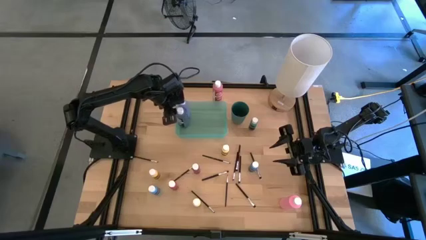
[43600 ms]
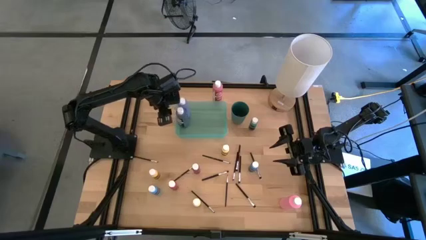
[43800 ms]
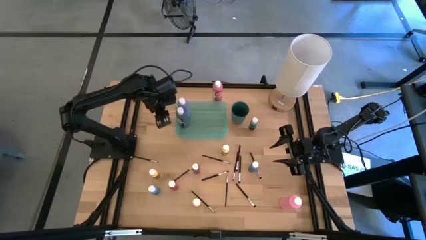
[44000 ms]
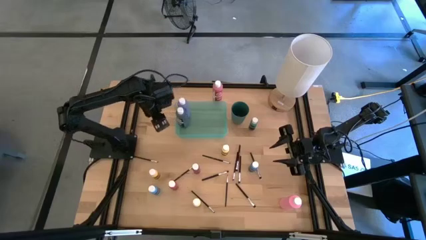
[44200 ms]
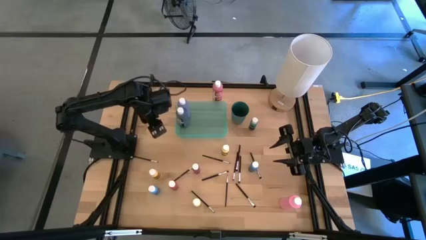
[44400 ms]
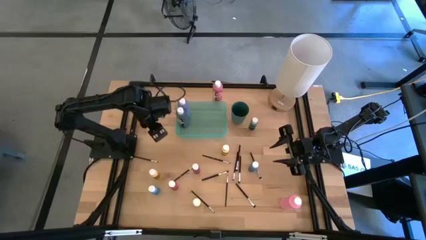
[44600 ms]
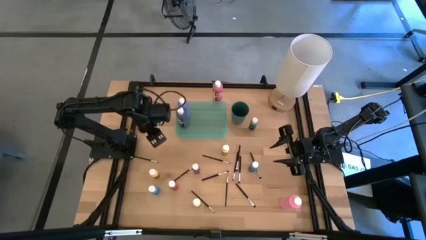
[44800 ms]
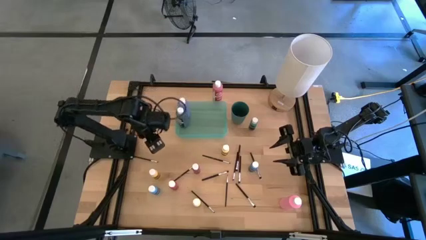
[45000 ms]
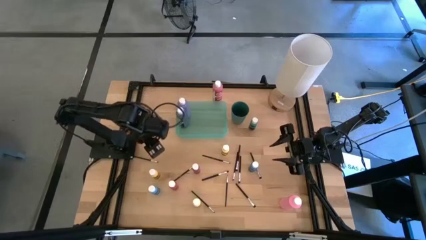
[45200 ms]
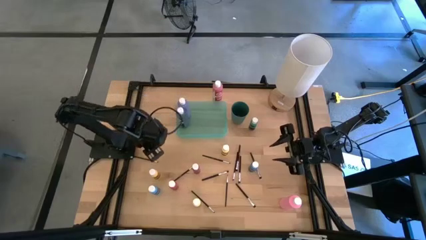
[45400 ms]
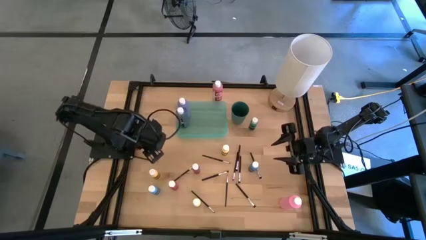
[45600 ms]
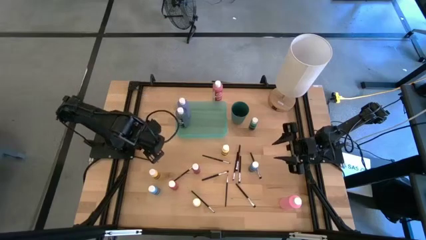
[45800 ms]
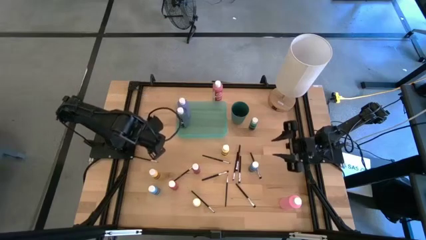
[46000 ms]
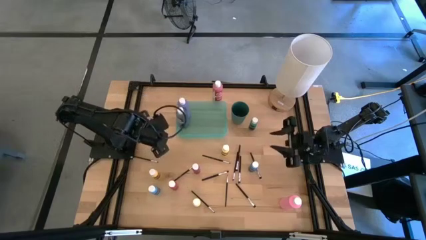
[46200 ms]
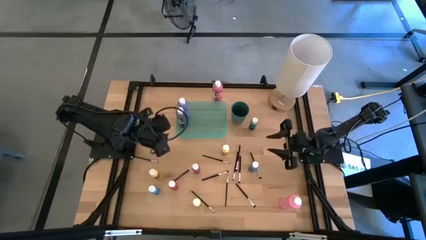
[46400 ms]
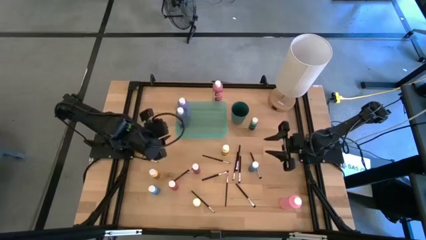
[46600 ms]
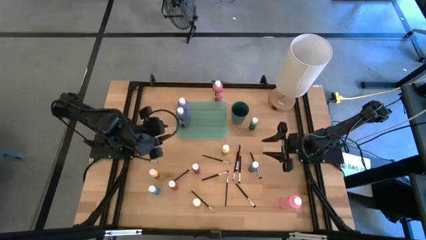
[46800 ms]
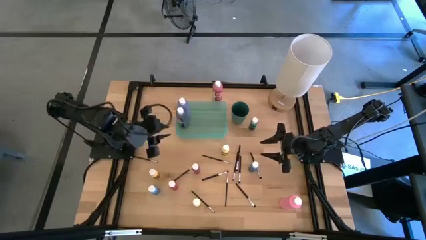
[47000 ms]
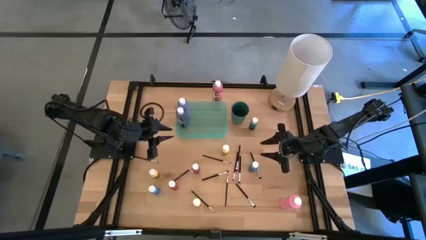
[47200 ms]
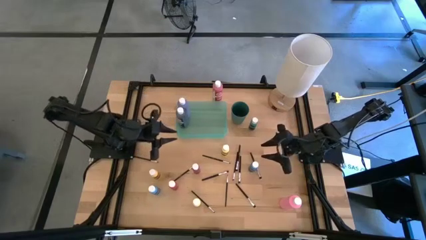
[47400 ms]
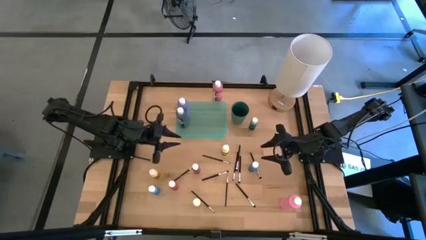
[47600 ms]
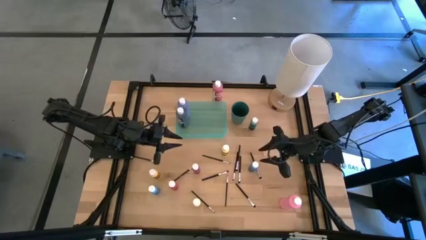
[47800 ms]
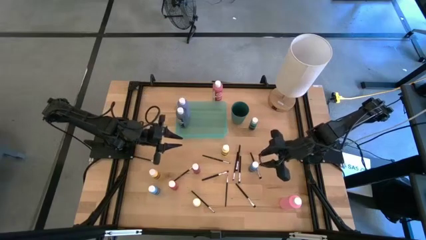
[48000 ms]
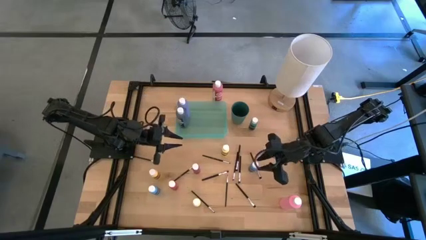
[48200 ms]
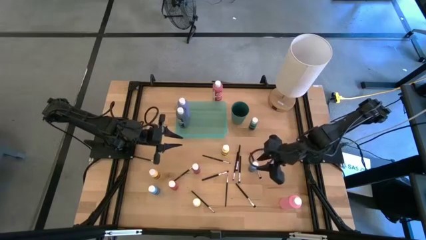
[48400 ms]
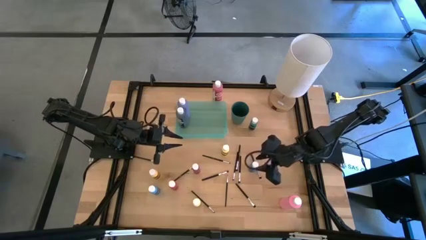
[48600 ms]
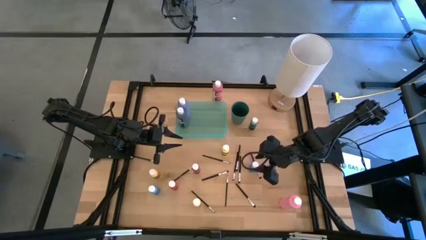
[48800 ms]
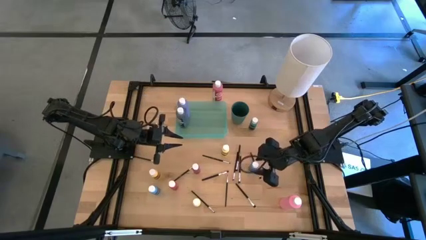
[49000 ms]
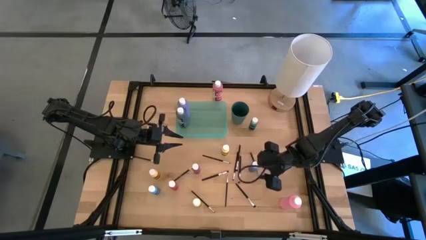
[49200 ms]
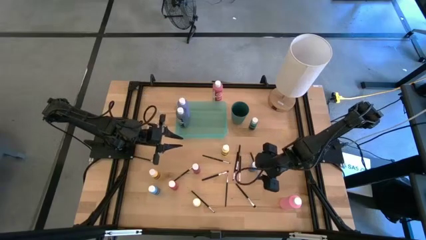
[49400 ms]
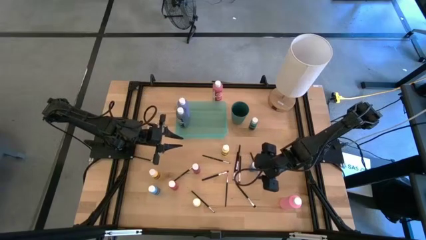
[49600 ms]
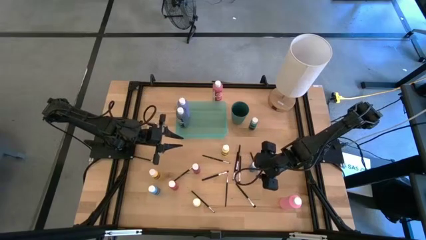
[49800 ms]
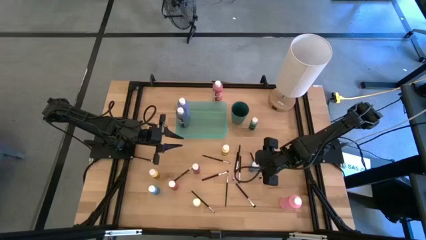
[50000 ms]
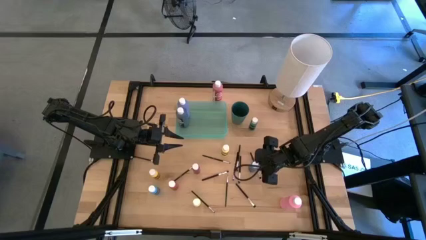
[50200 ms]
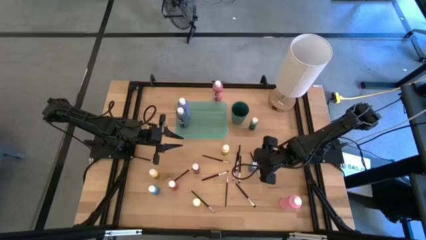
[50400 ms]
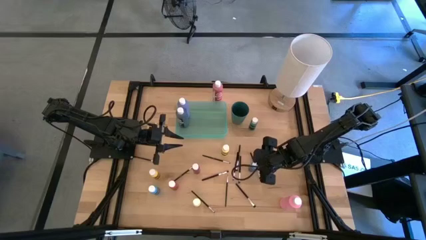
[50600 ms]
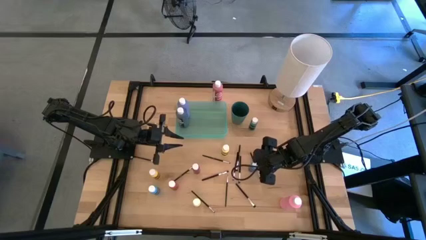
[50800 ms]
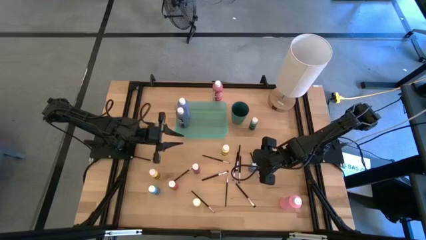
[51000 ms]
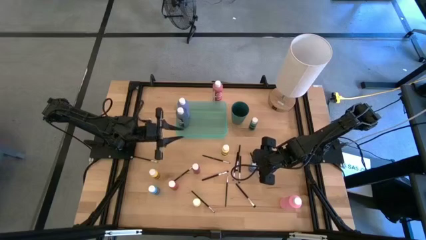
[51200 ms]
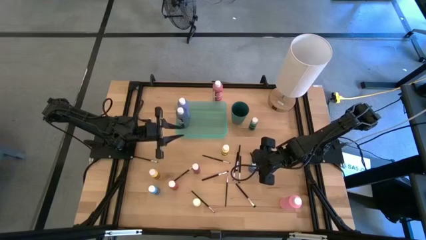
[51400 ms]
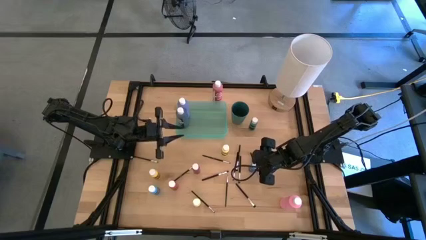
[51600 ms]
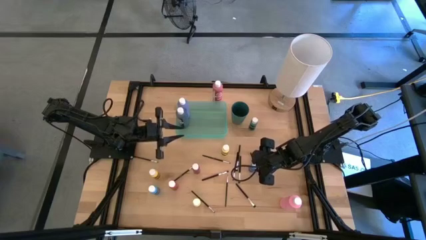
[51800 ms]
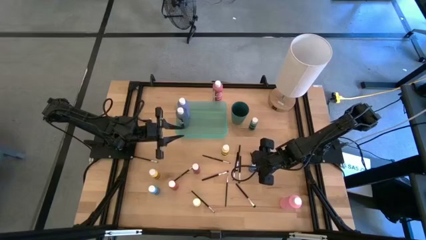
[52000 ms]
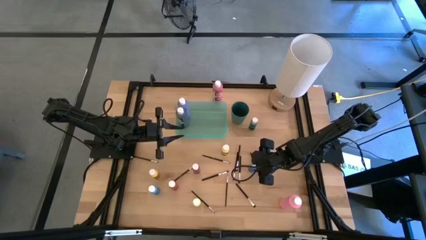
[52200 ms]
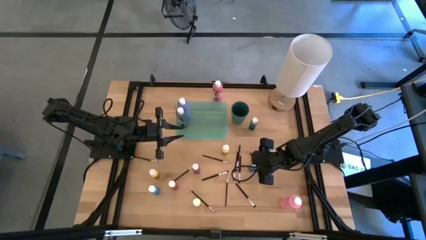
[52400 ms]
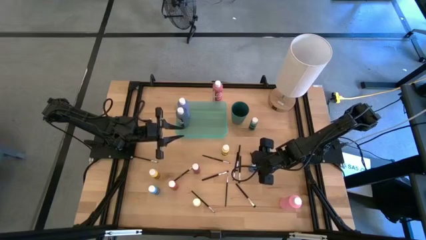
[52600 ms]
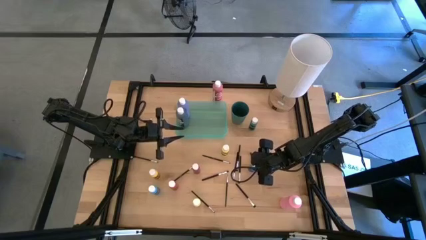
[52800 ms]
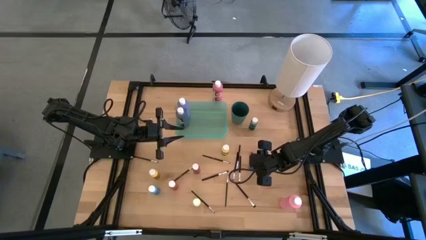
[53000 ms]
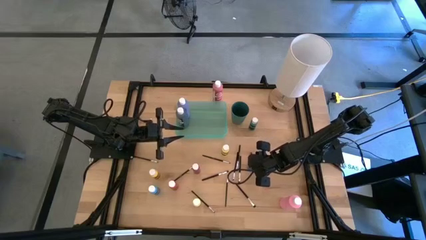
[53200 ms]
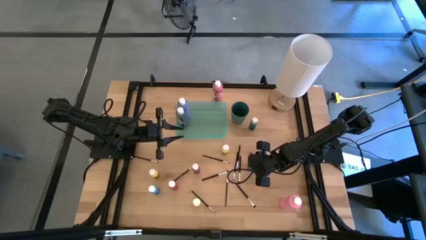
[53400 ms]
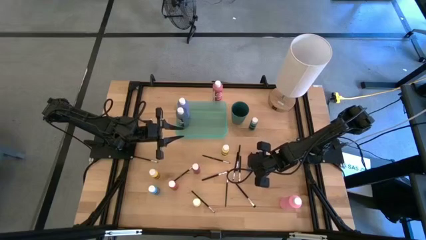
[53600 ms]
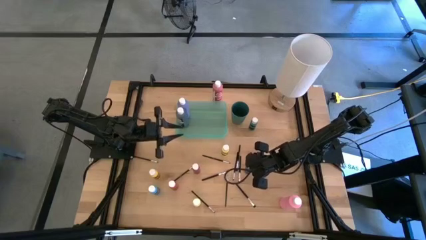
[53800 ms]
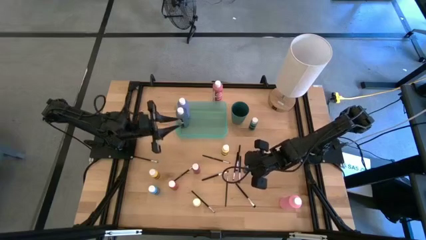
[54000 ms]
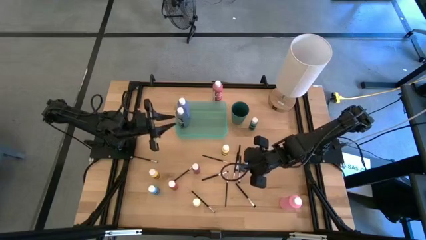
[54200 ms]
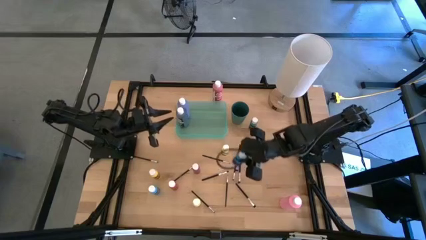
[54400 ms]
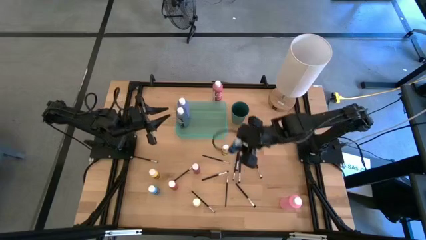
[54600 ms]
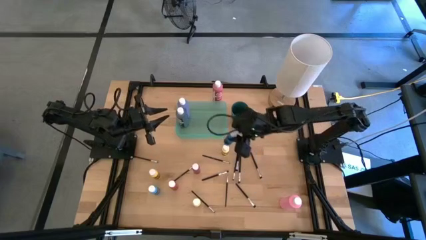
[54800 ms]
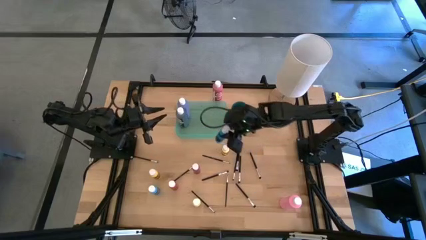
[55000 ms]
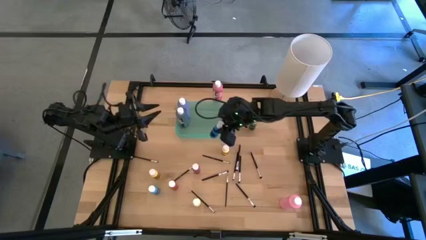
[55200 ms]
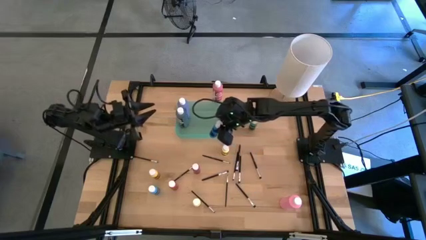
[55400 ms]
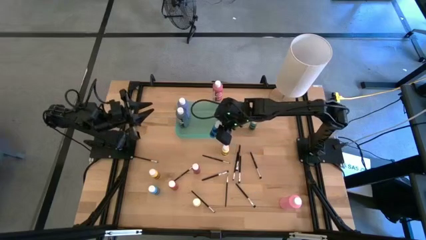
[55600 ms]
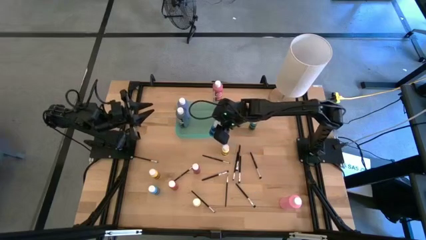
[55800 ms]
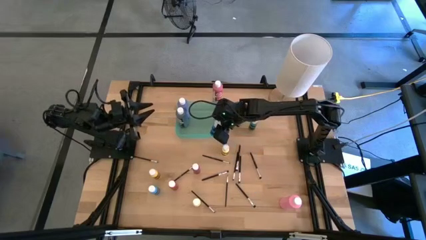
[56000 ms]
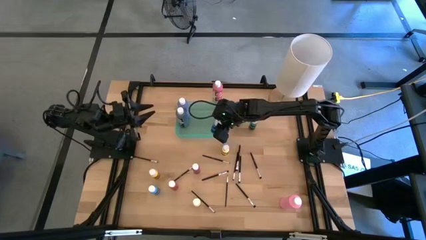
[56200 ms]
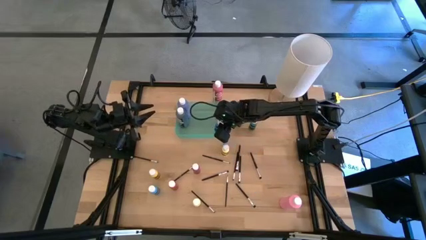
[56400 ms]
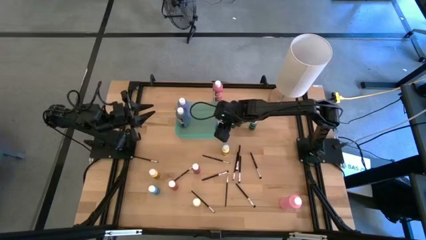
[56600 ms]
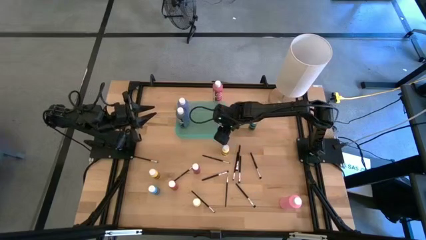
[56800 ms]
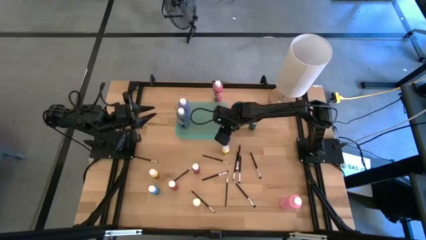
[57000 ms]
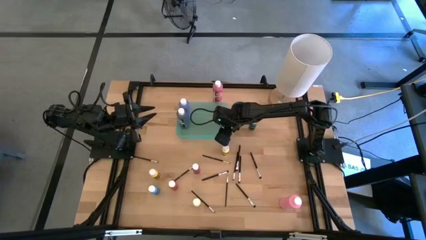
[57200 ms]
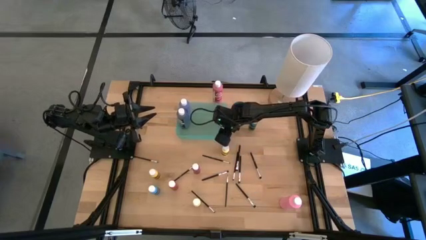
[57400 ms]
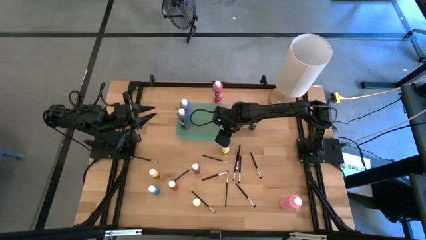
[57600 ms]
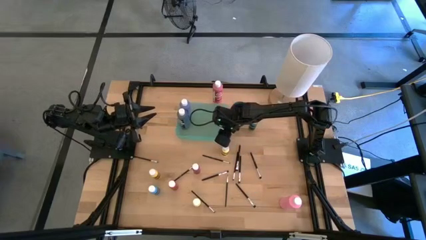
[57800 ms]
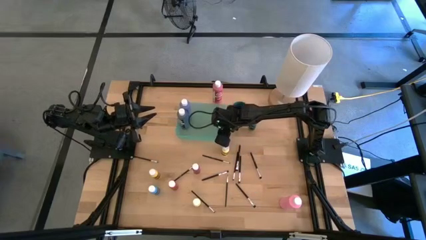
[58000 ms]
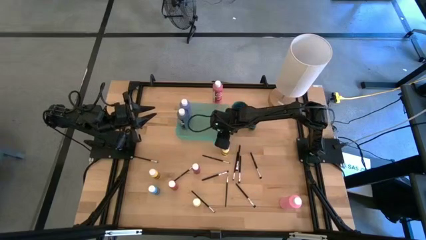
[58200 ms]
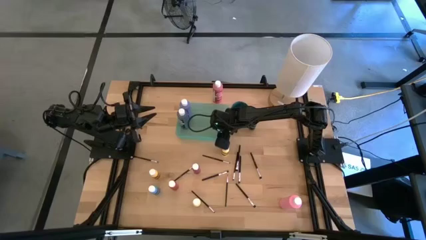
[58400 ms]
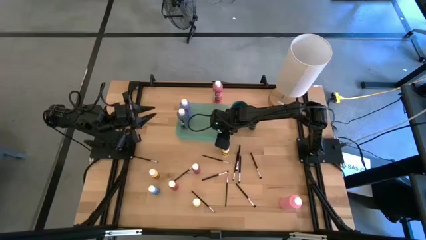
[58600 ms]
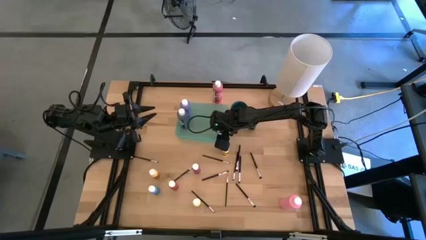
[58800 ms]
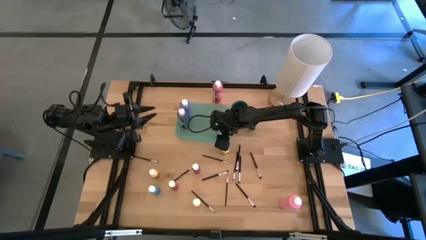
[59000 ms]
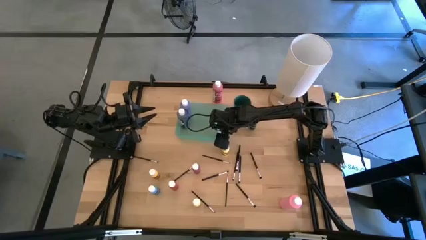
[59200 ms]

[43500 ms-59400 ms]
Task: Pick & Place Paint Supplies
Put the right small blue paint bottle into the green bin
